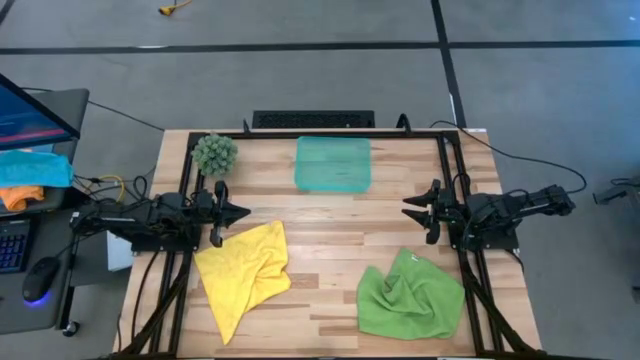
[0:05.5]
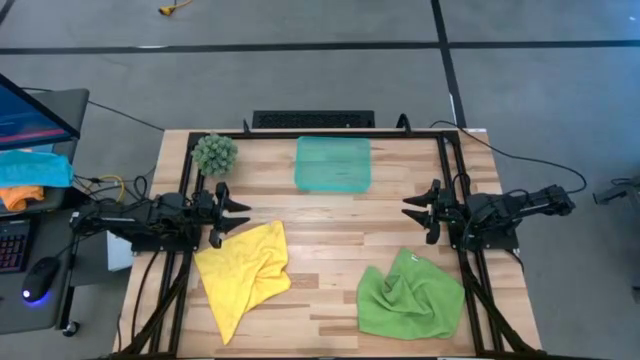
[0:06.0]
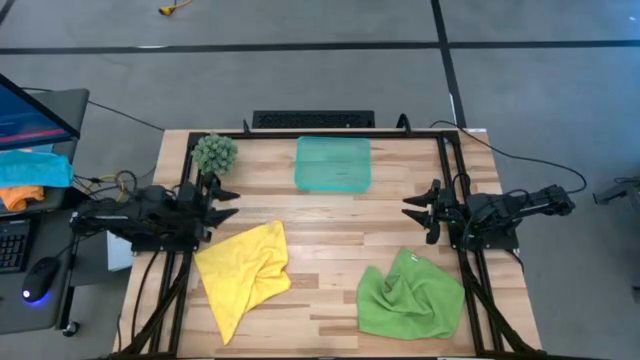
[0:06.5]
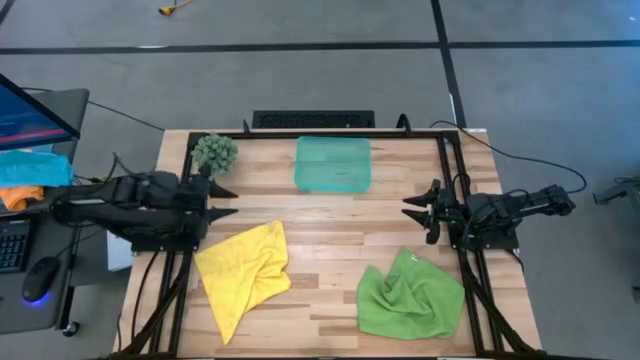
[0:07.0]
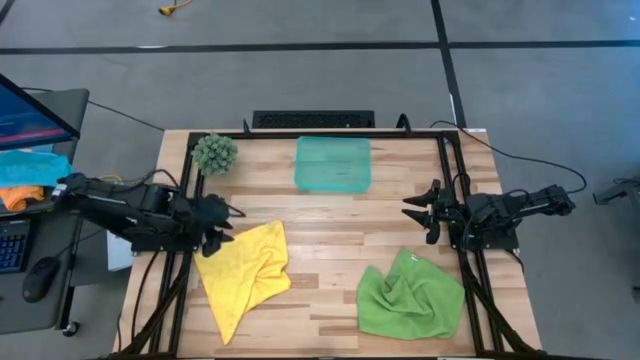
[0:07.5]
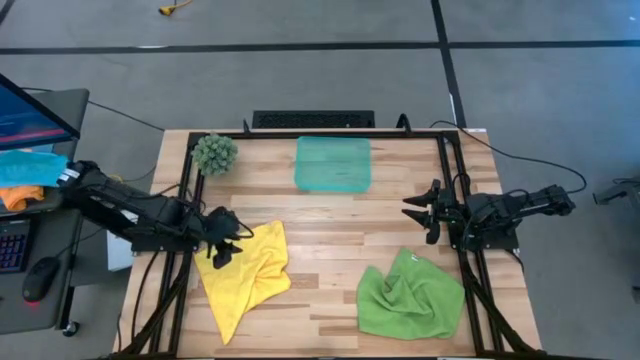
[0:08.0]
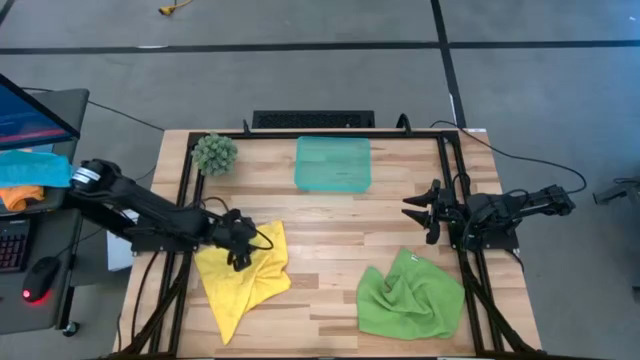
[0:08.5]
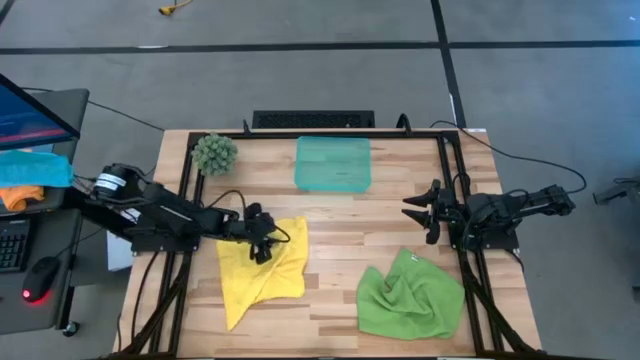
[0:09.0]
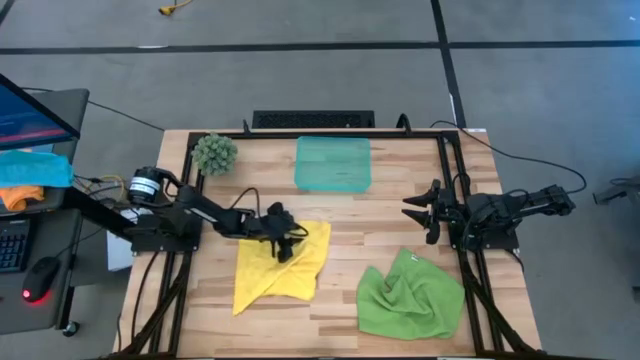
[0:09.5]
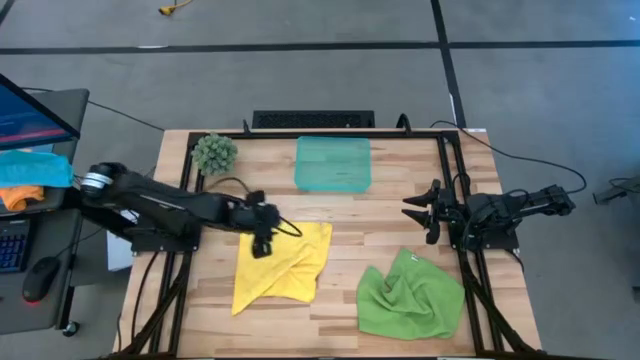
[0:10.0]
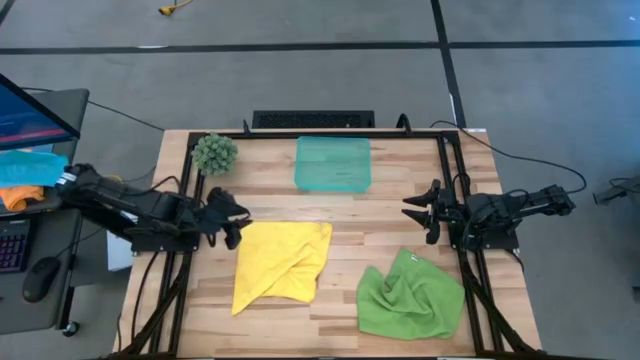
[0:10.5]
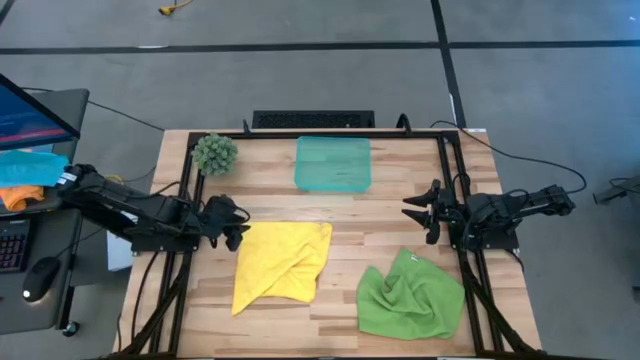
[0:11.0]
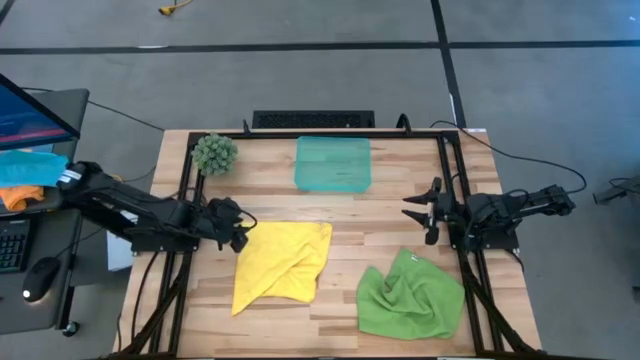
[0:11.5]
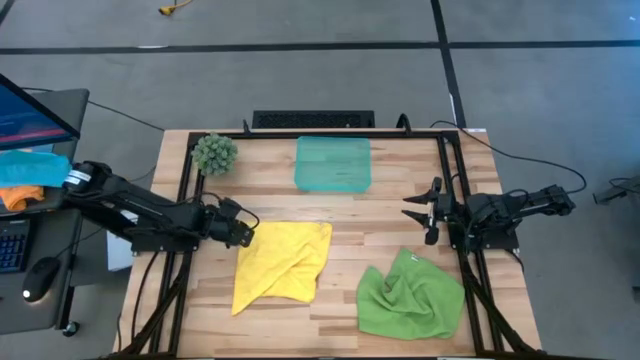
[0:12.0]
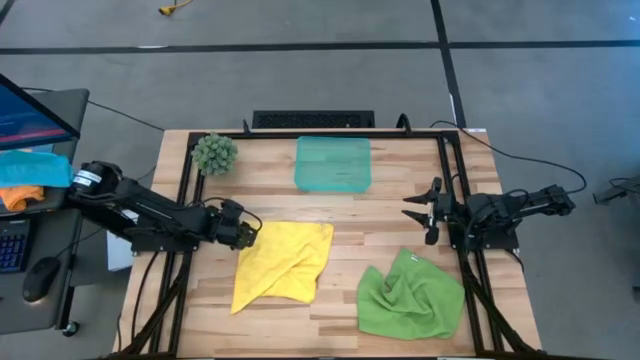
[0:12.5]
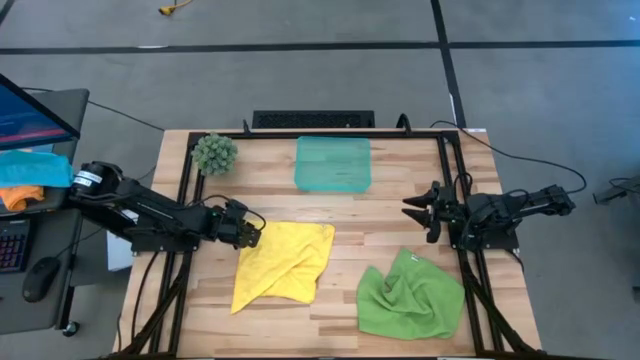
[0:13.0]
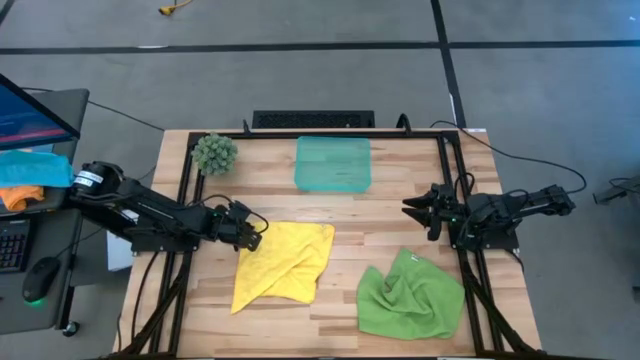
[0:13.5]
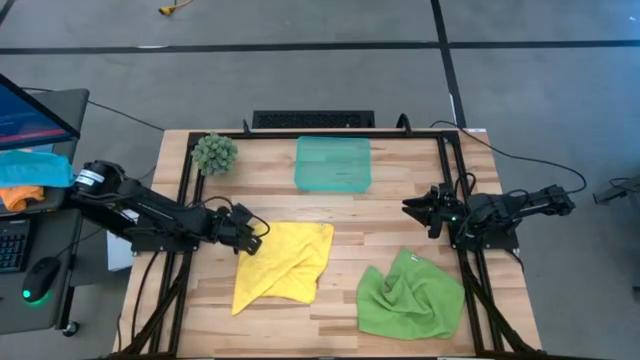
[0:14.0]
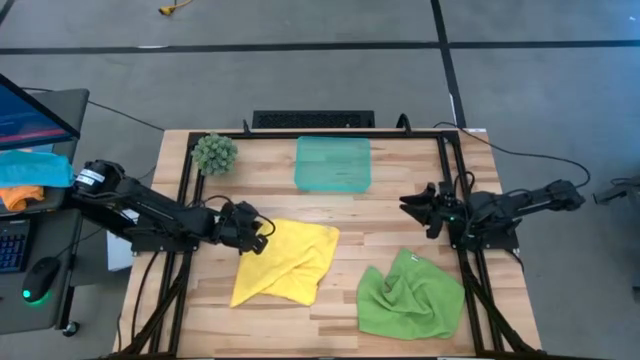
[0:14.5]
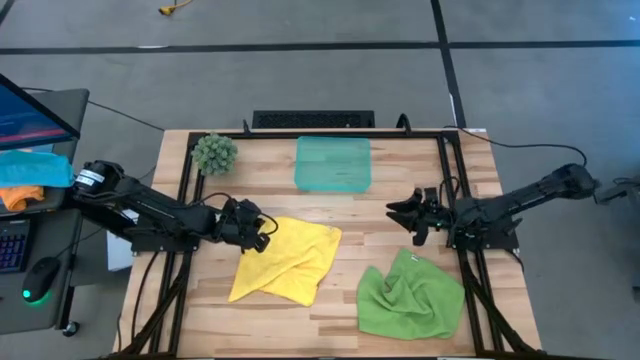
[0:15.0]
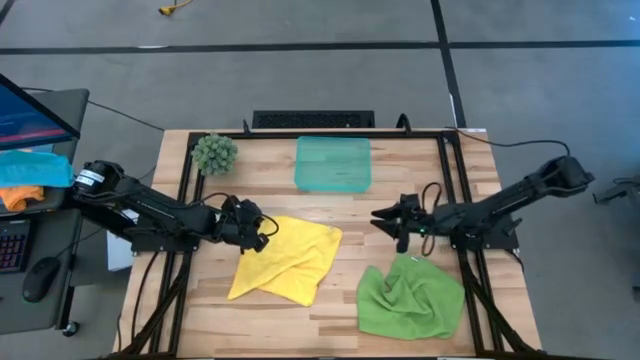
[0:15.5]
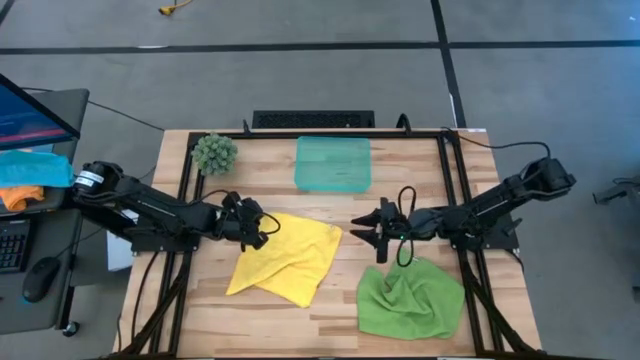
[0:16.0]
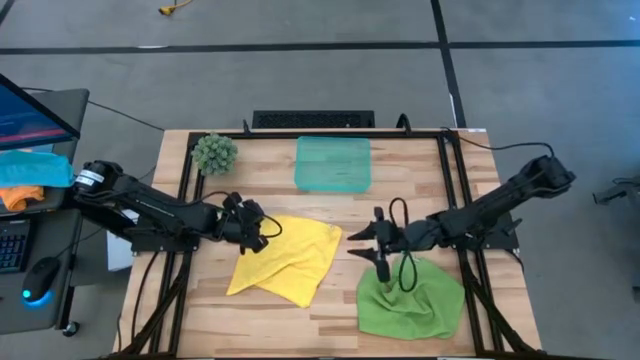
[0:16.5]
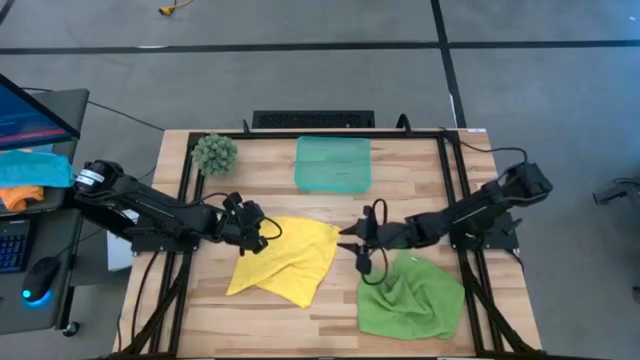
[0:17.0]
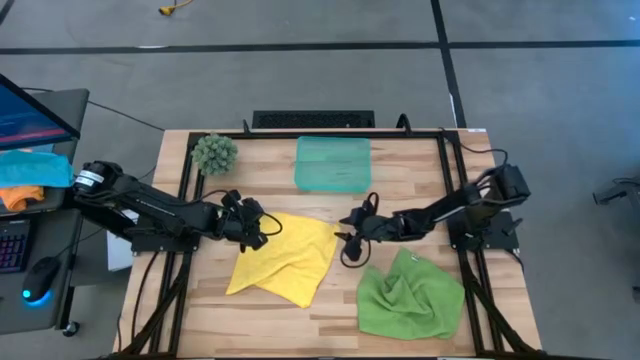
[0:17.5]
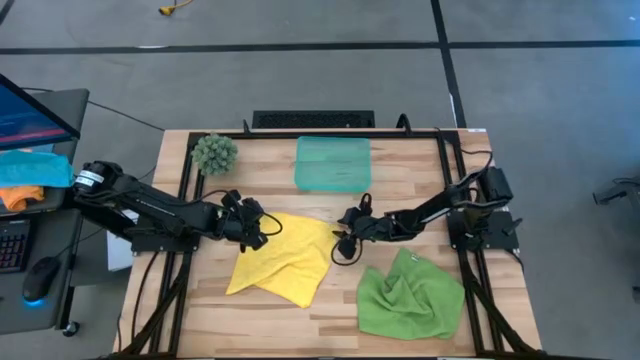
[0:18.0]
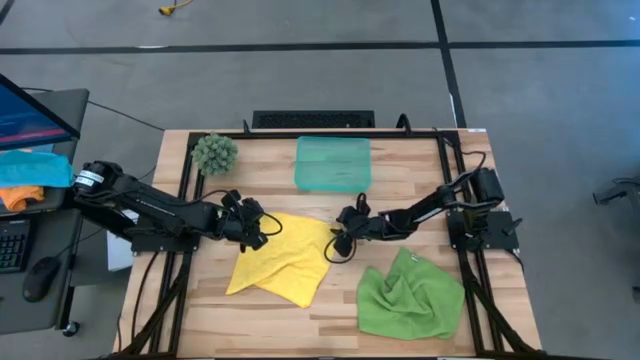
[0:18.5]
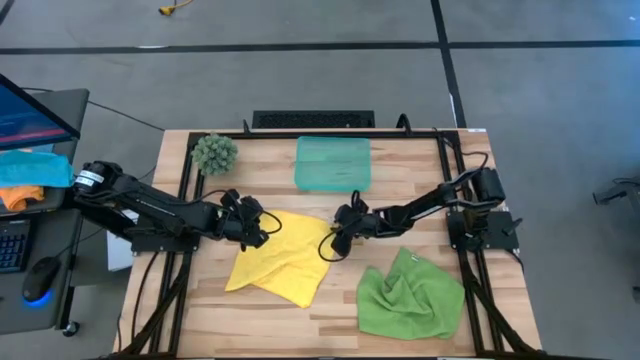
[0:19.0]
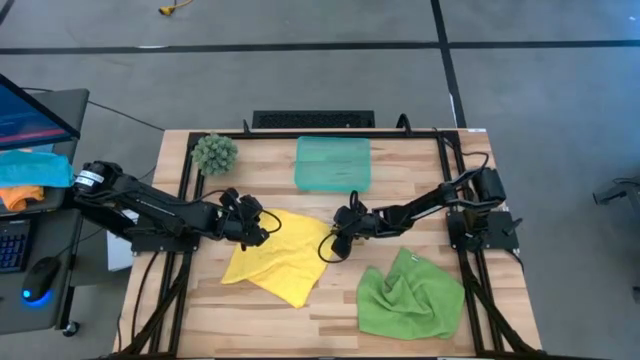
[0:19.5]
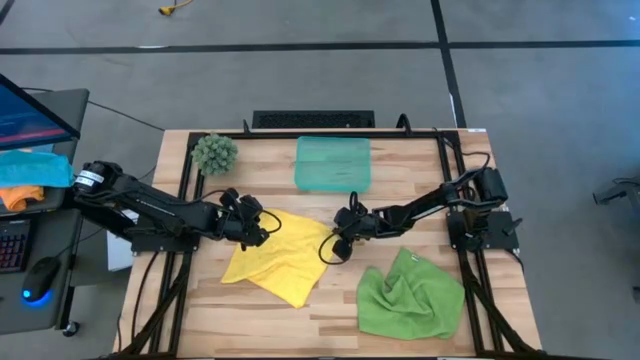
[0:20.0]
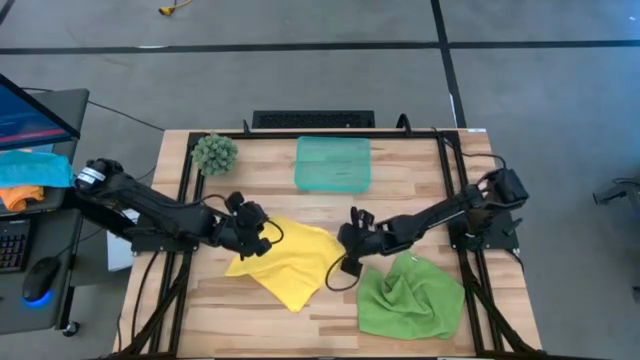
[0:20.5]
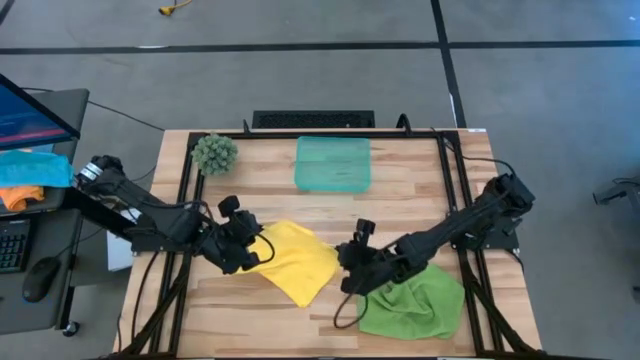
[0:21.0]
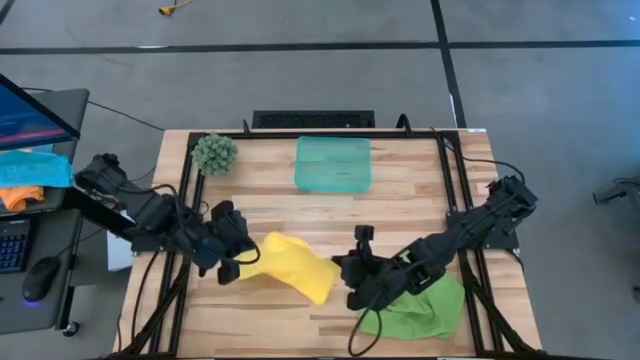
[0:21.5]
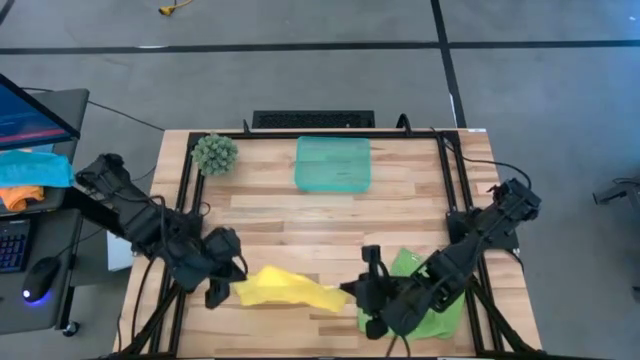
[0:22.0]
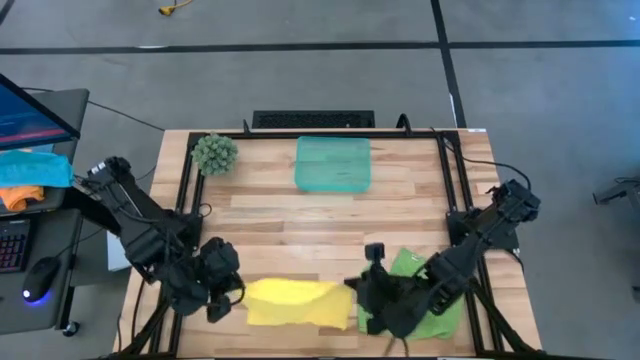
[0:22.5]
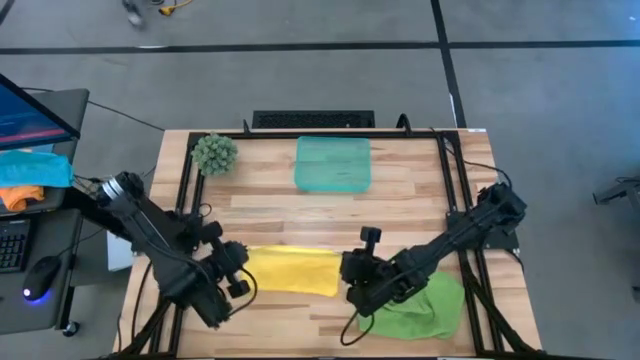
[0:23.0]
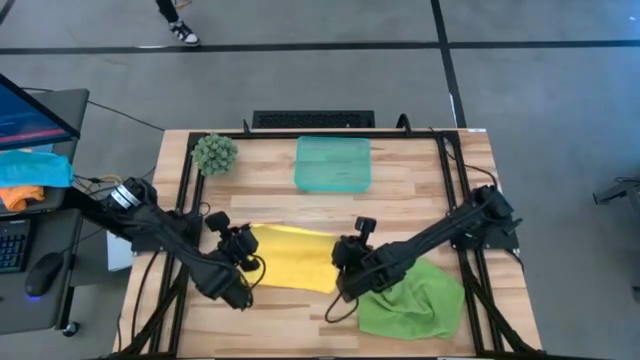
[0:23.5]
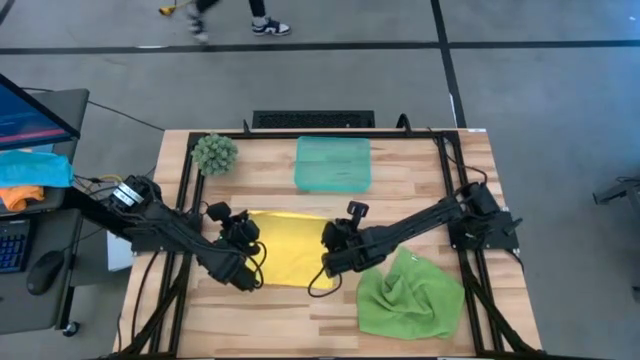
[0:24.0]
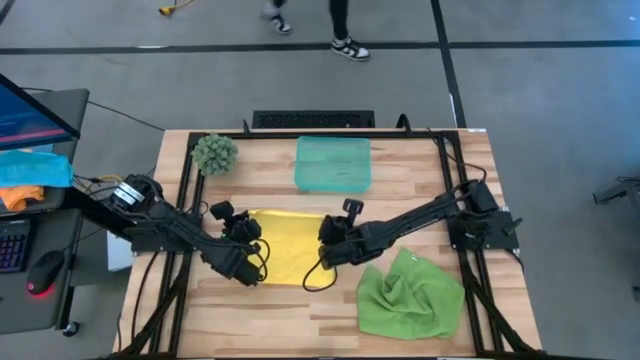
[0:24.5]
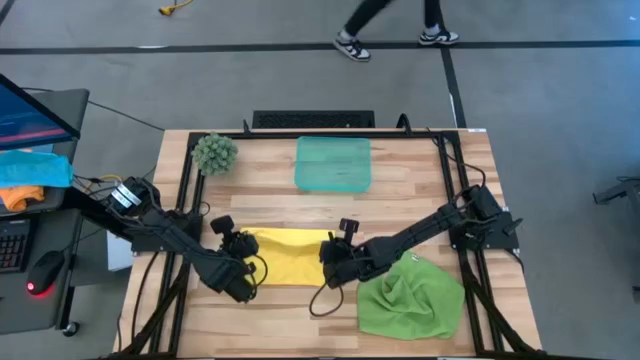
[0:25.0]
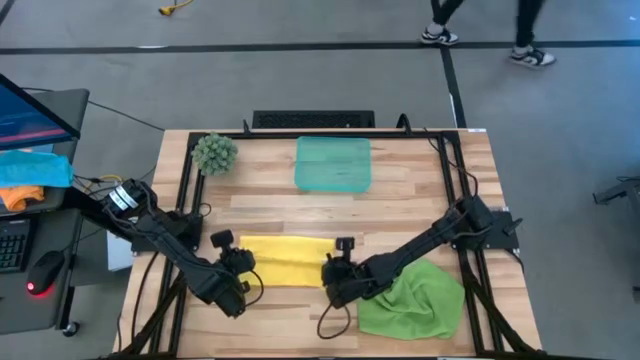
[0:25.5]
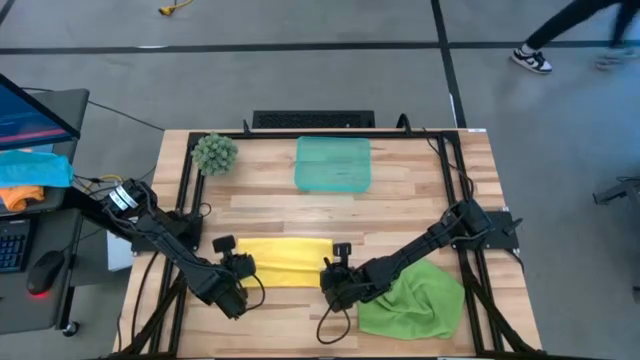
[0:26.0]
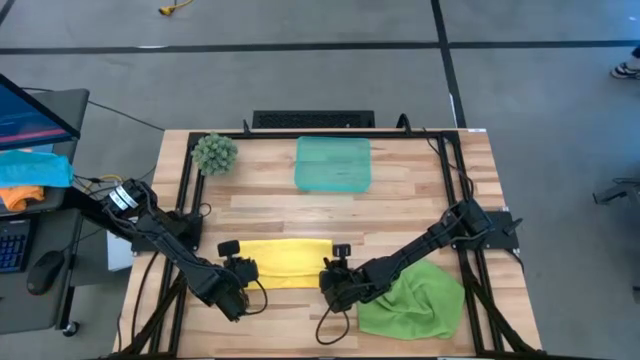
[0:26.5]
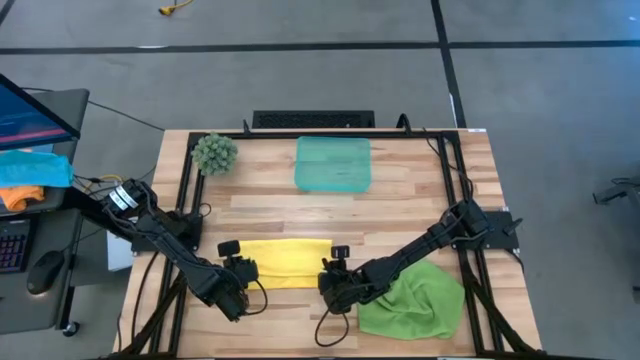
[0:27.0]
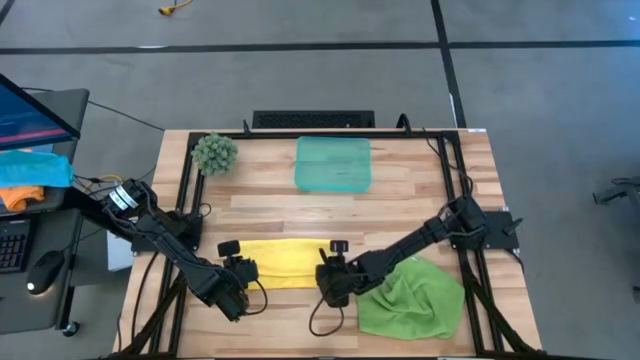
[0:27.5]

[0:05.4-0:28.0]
Task: Roll microfiber towels into tight, uniform cylinder then place into a basket
Fold the yellow microfiber cloth
